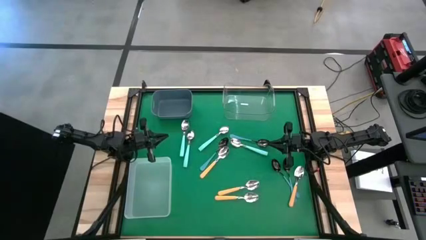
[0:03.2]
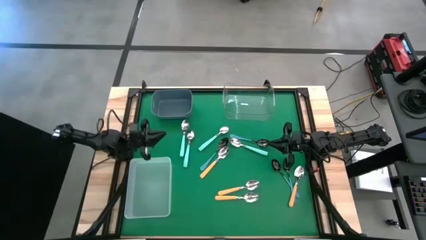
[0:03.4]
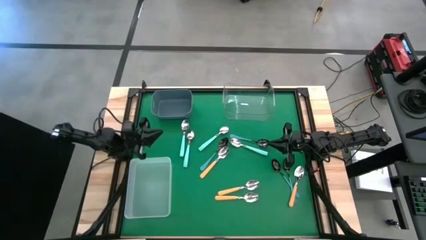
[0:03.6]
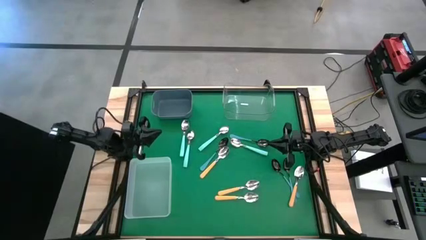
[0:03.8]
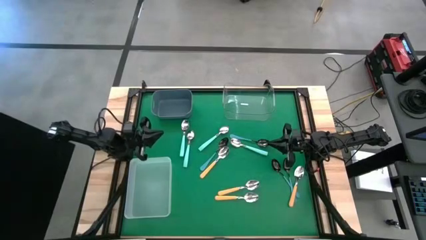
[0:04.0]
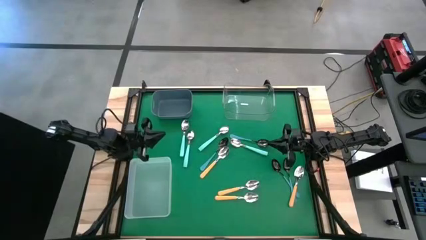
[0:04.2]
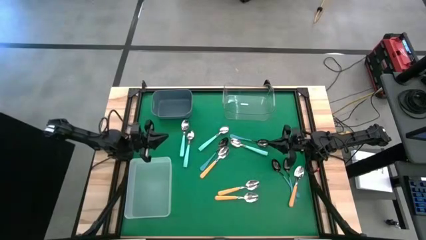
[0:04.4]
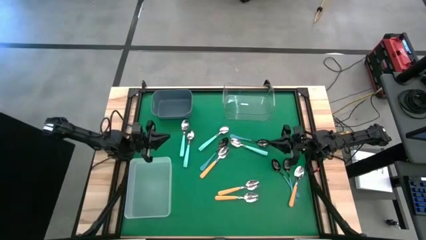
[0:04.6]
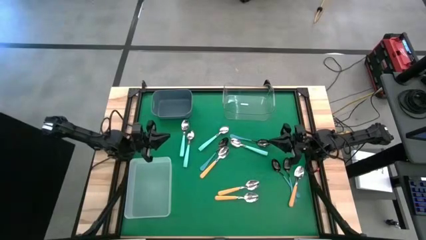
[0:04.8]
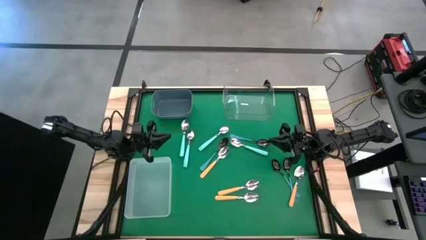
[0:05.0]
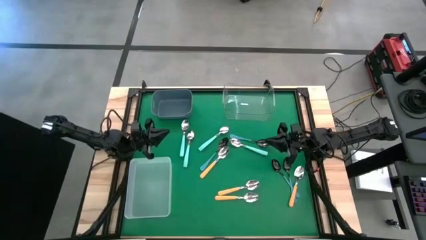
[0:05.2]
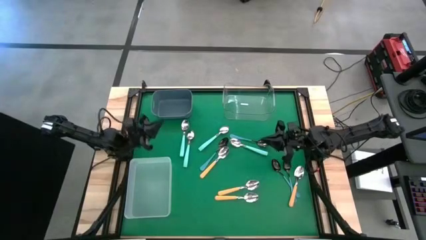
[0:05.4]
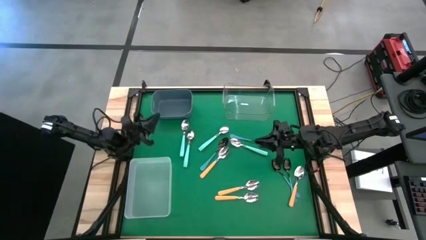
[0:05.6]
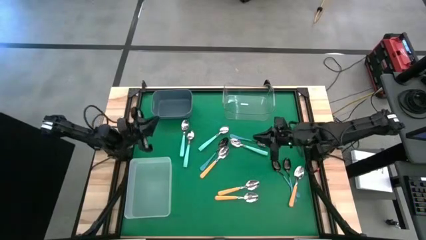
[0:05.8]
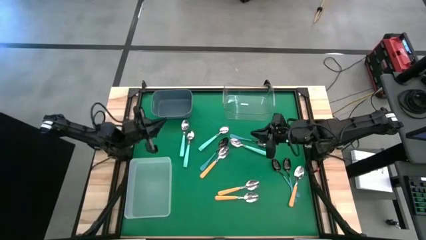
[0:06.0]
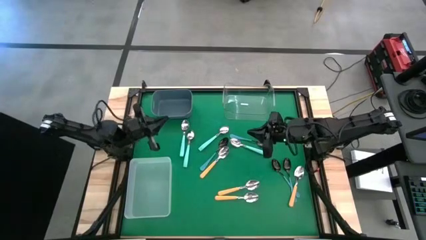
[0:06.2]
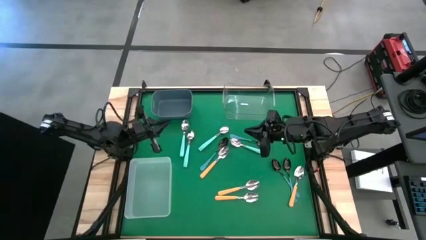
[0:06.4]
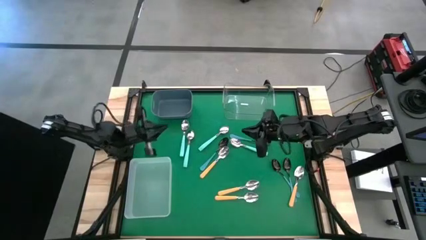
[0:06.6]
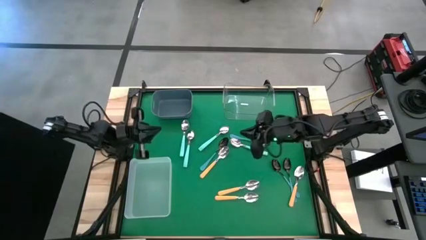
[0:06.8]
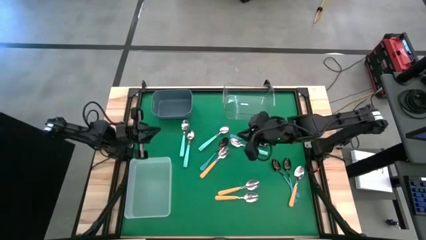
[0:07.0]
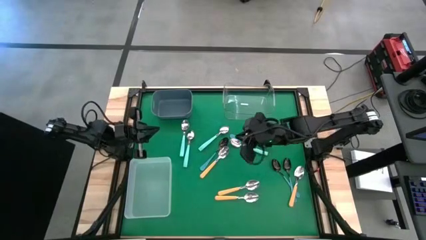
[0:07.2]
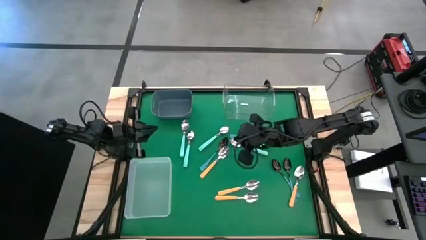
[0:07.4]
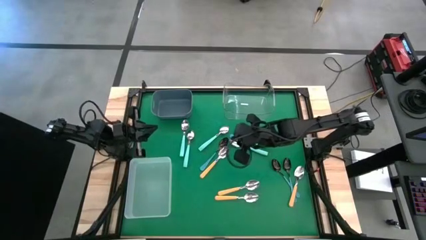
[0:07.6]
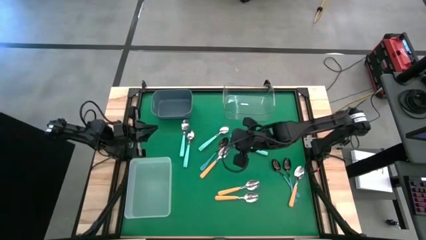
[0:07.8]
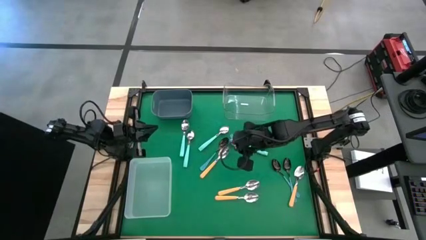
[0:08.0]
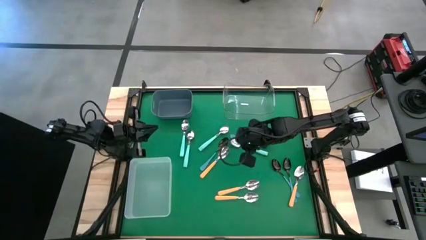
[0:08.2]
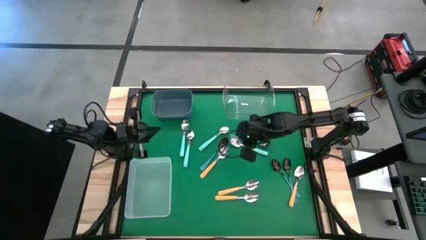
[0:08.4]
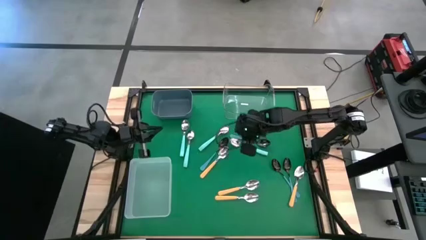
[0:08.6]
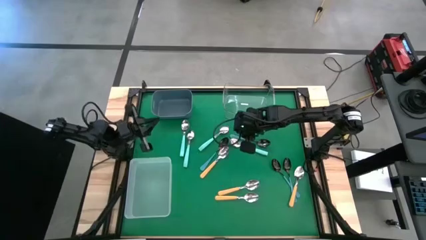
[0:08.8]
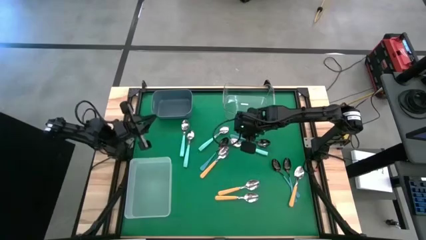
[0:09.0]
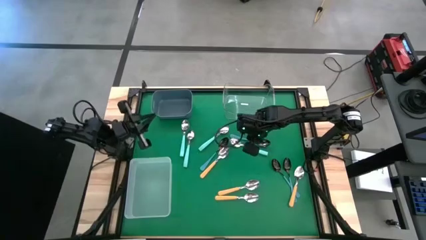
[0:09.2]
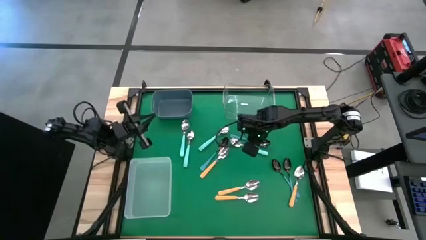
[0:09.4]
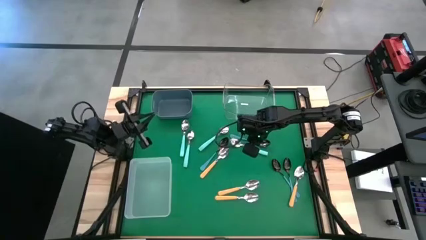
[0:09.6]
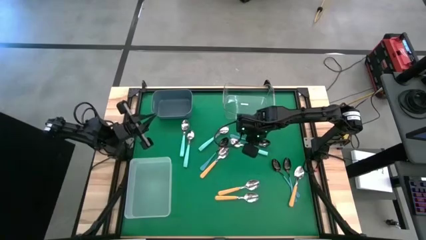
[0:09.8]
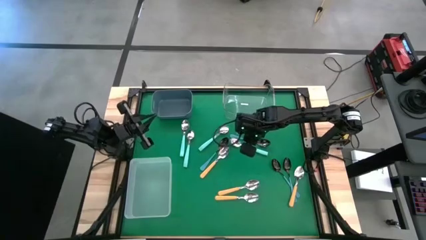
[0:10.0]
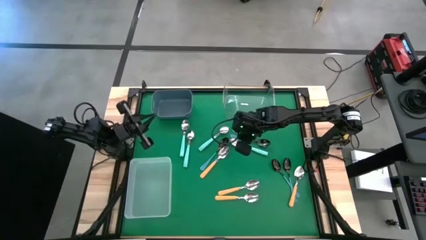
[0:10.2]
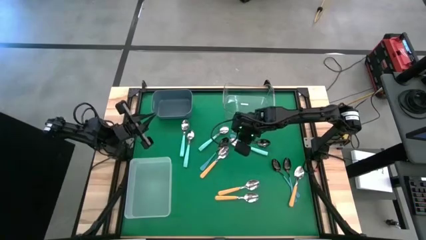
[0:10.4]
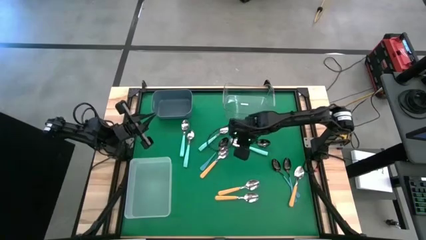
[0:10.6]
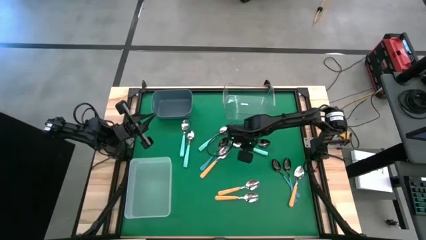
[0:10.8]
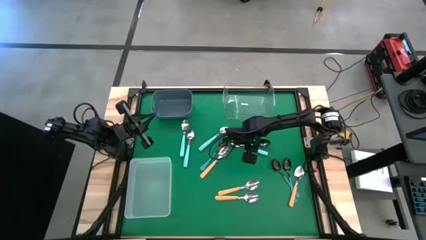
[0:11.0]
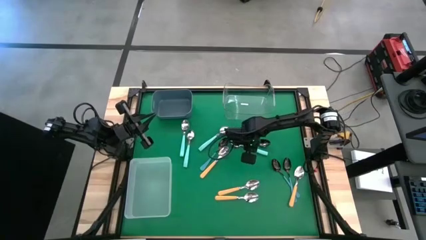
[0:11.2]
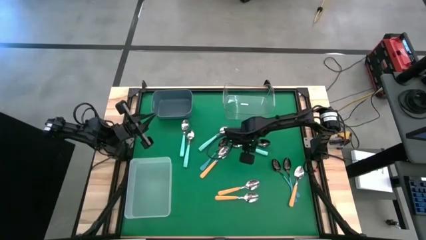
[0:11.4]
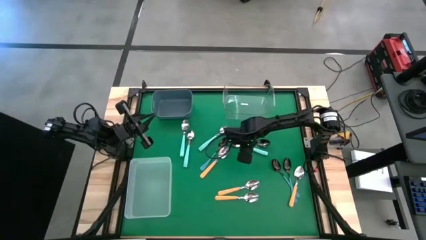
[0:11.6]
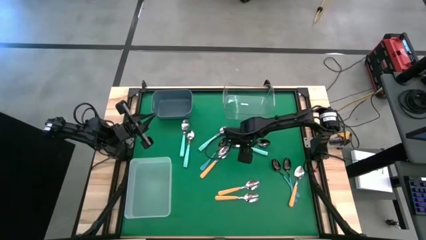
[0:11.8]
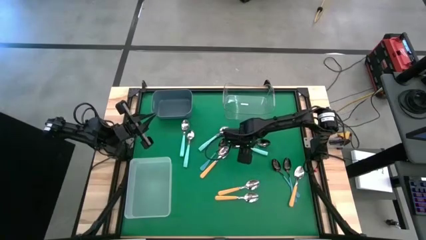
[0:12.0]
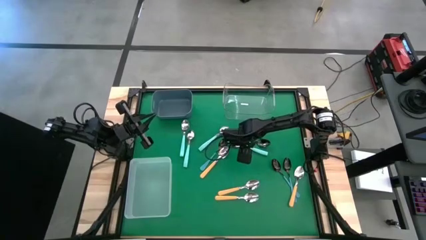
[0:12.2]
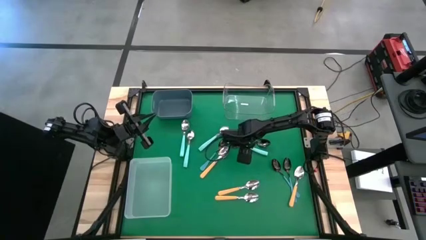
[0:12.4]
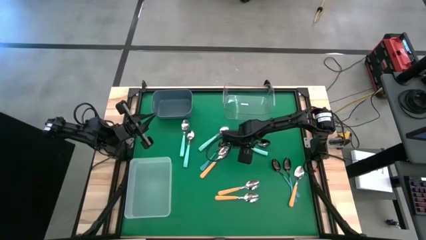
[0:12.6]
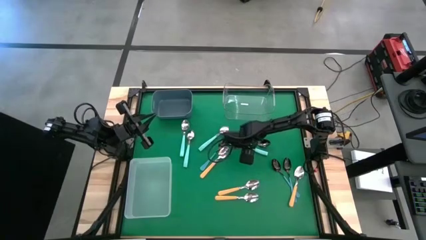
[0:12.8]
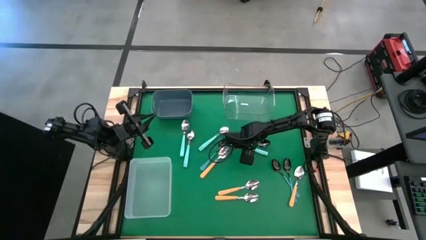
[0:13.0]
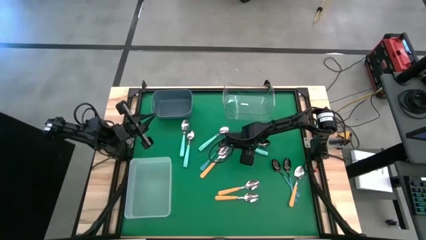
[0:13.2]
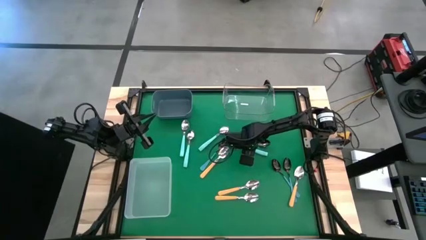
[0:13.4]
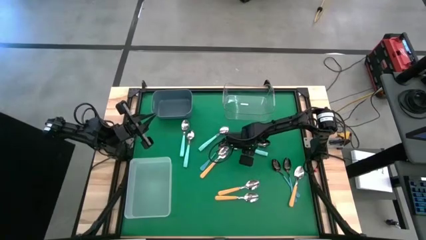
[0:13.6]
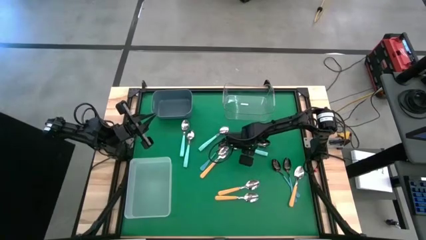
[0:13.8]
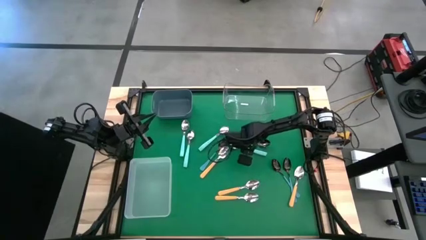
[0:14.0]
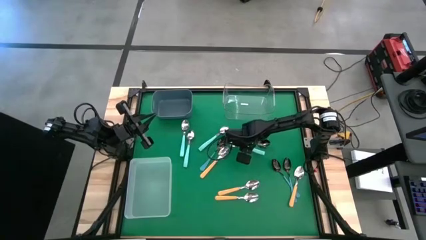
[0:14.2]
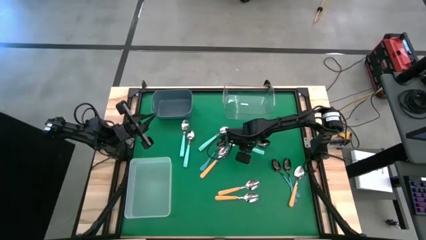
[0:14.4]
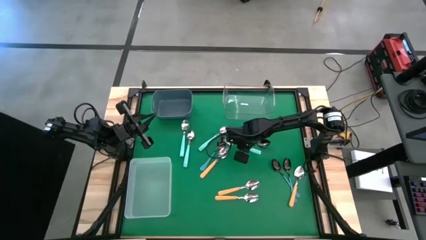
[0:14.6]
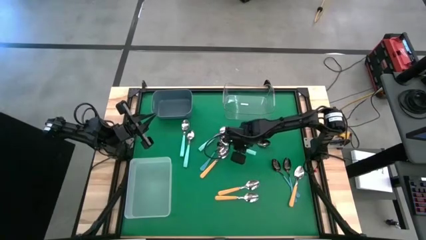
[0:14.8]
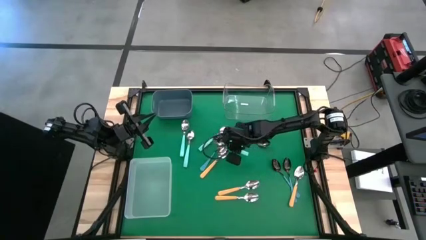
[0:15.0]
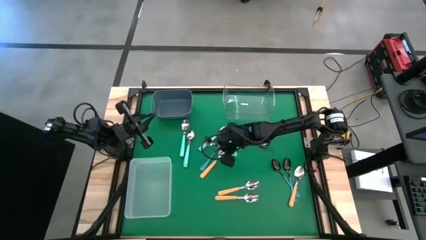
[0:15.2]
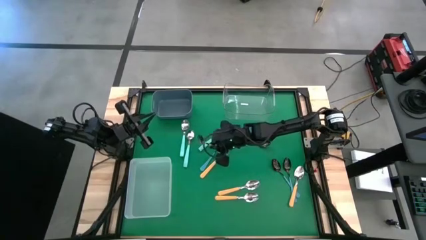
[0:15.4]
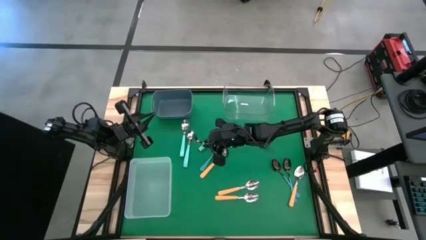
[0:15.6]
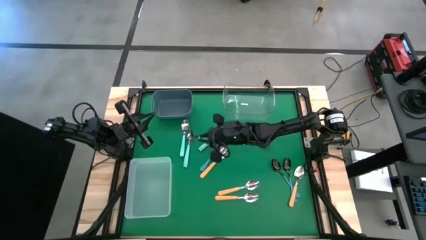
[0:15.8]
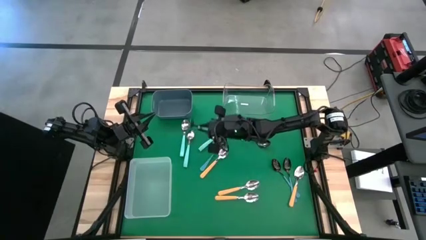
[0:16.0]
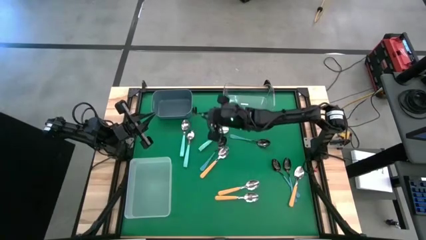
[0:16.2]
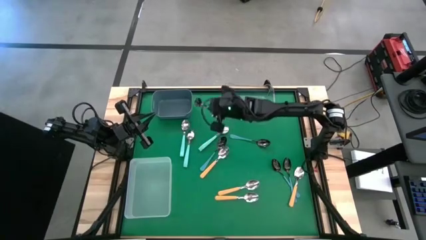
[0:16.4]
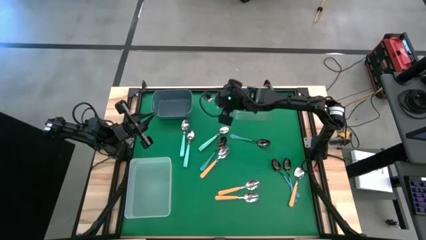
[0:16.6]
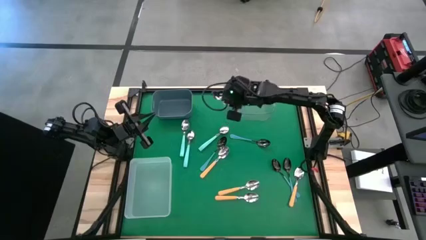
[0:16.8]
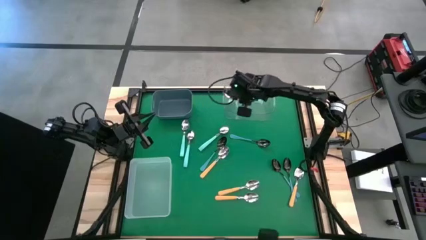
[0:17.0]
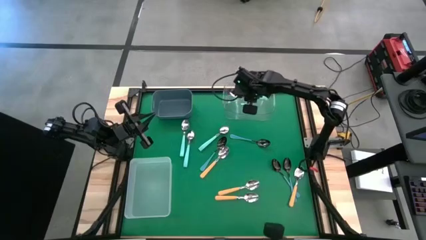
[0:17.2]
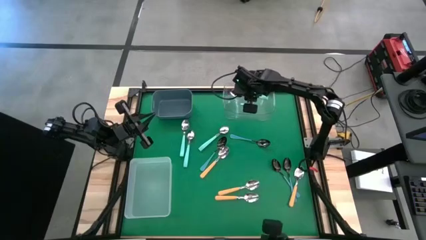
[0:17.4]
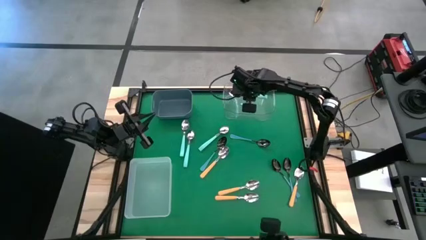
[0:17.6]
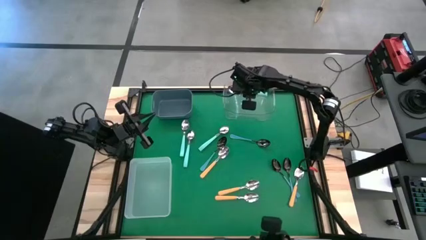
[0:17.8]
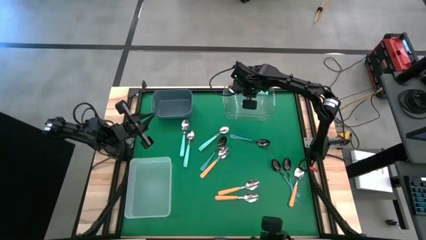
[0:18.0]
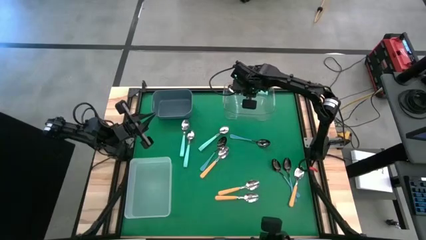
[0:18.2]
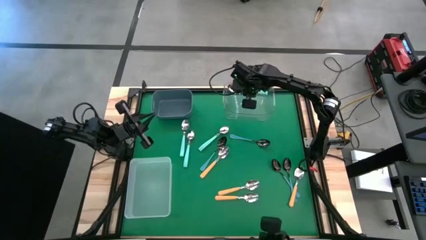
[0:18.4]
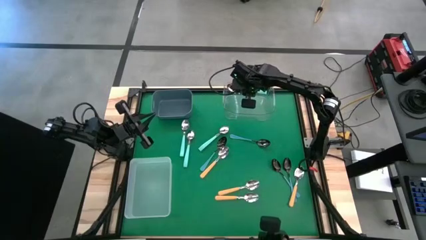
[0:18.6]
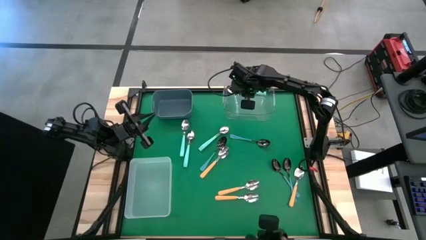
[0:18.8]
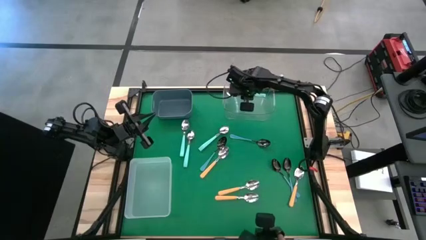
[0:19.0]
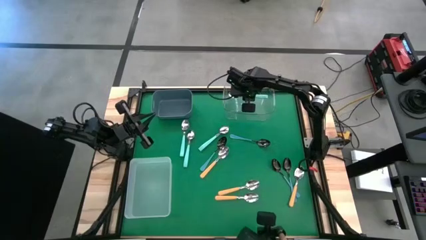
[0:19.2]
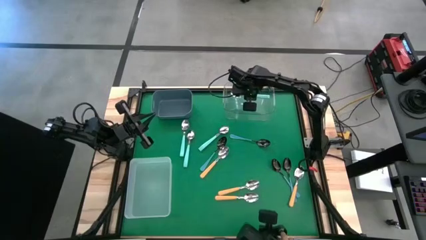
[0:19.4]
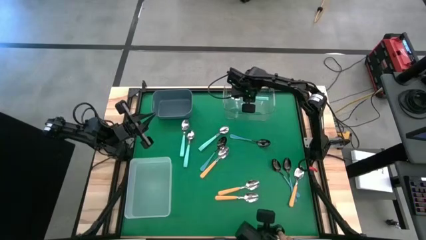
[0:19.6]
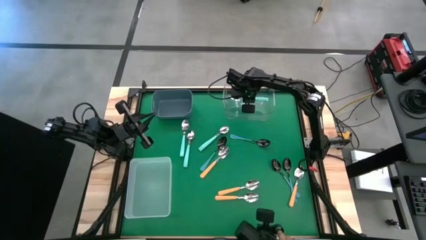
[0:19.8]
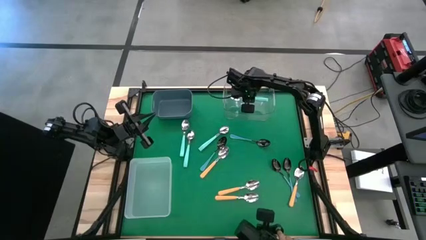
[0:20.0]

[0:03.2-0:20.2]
Task: Sort silverware by color (type)
Put the light blue spoon into the transparent bin
